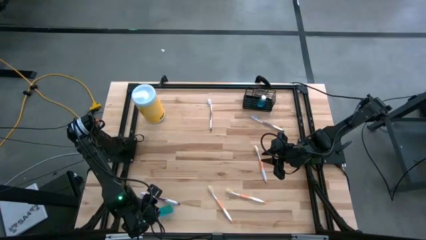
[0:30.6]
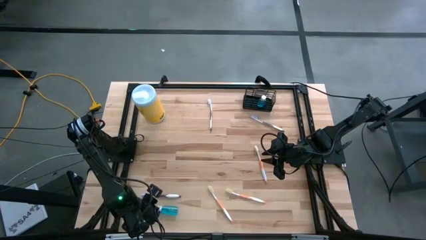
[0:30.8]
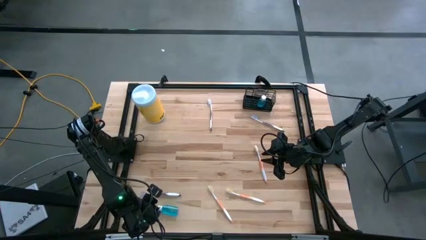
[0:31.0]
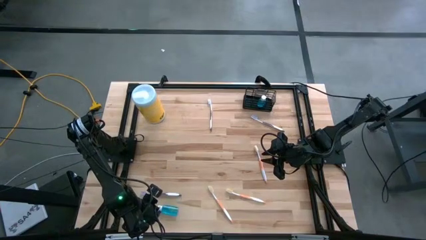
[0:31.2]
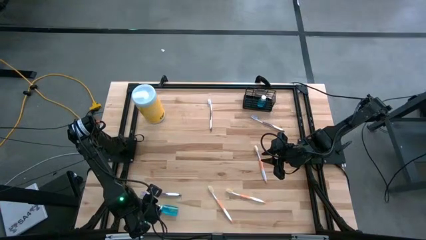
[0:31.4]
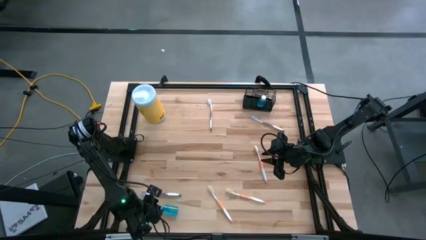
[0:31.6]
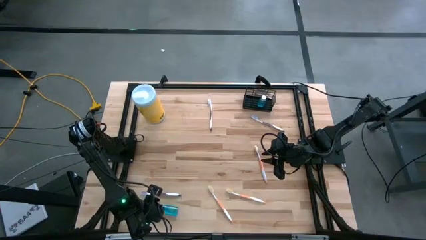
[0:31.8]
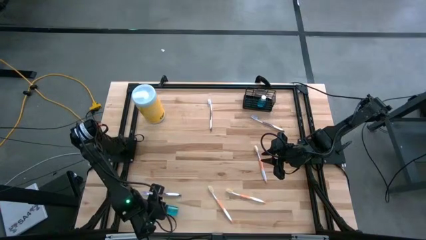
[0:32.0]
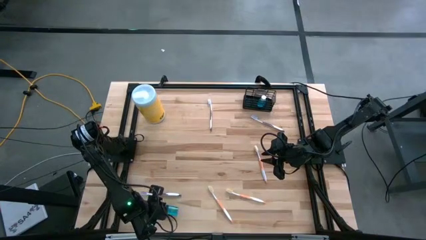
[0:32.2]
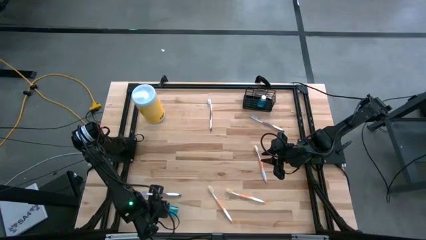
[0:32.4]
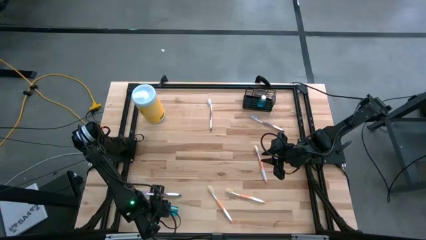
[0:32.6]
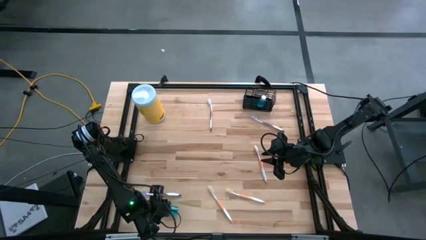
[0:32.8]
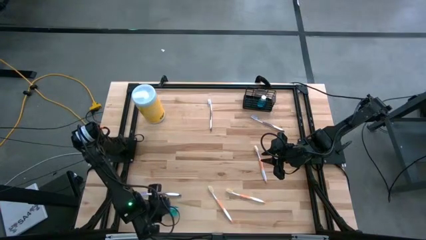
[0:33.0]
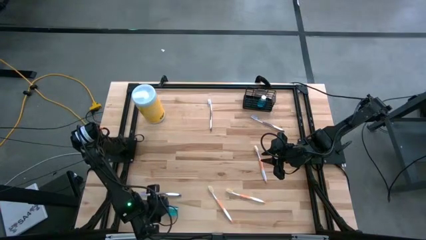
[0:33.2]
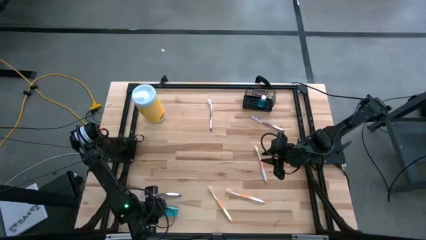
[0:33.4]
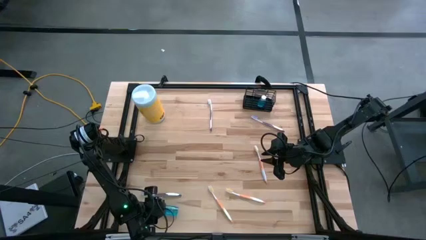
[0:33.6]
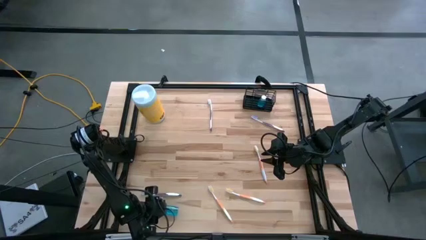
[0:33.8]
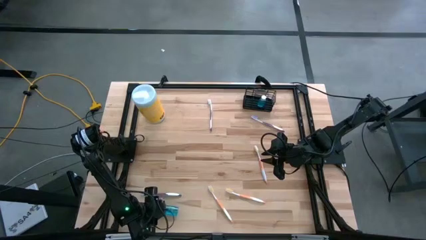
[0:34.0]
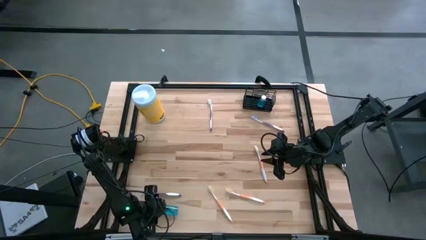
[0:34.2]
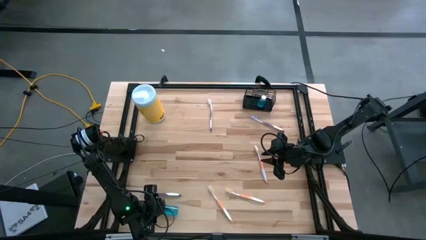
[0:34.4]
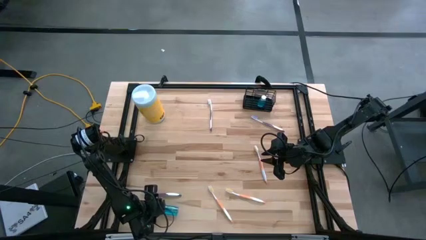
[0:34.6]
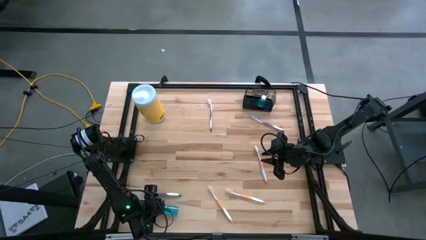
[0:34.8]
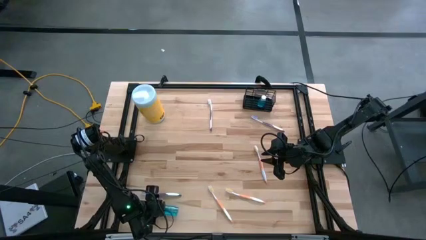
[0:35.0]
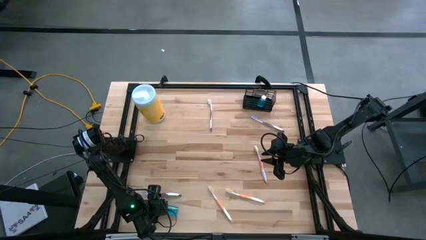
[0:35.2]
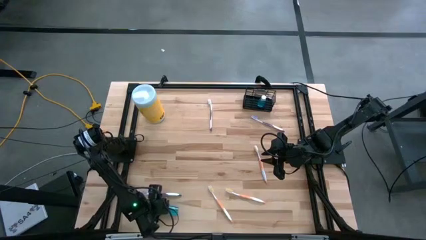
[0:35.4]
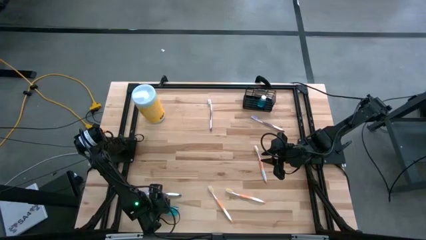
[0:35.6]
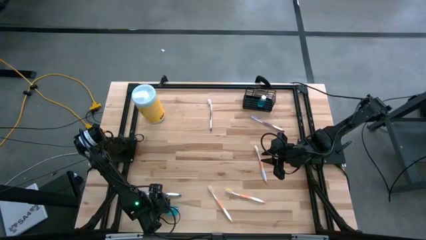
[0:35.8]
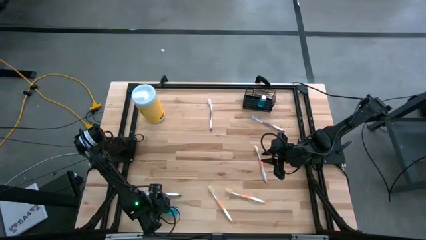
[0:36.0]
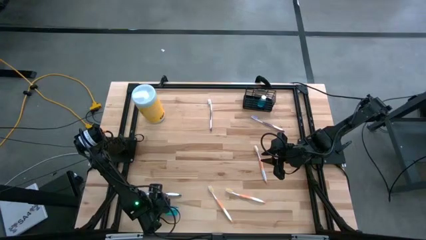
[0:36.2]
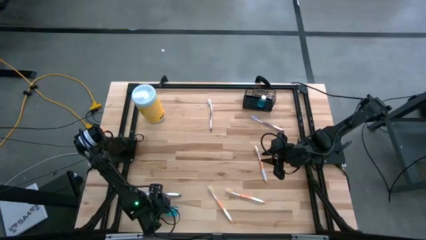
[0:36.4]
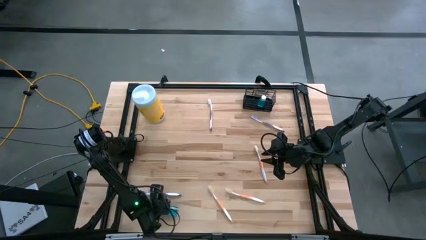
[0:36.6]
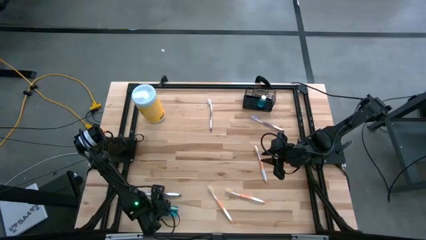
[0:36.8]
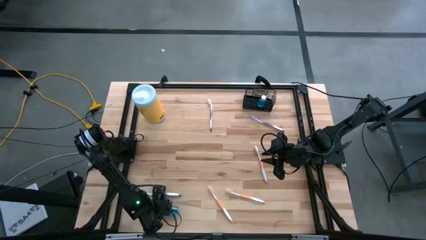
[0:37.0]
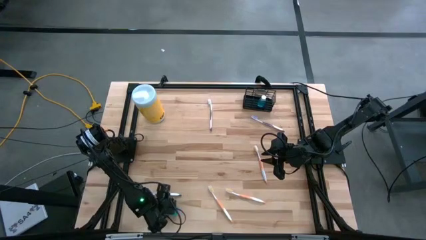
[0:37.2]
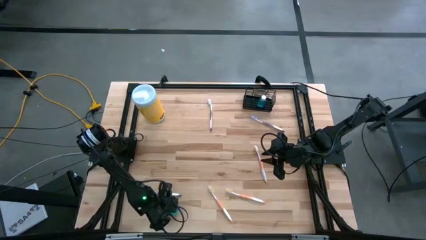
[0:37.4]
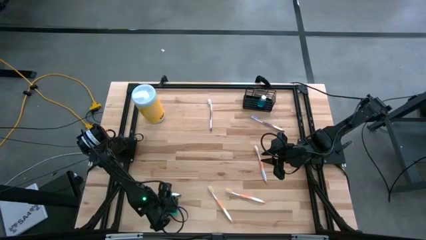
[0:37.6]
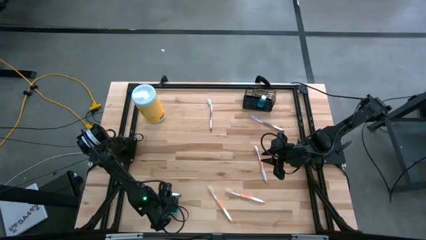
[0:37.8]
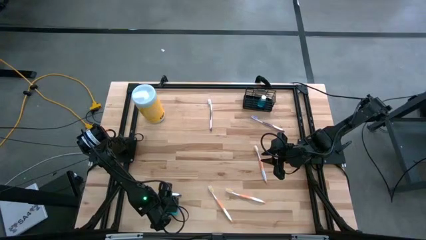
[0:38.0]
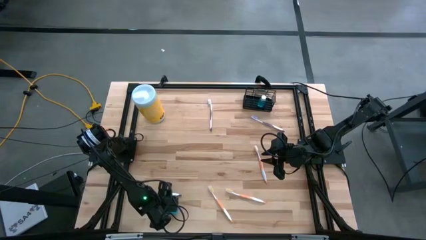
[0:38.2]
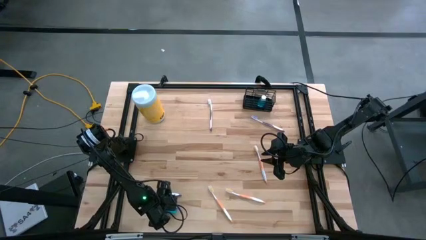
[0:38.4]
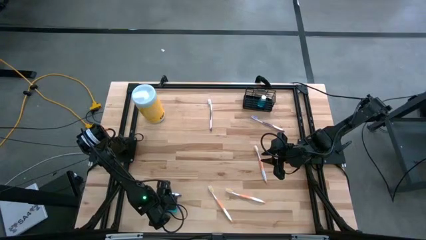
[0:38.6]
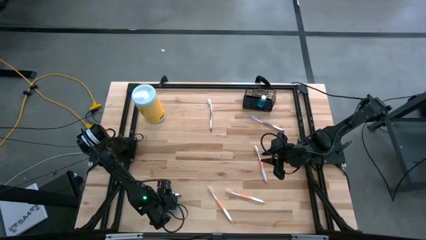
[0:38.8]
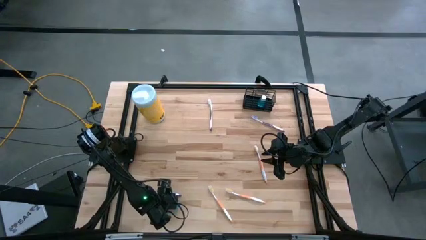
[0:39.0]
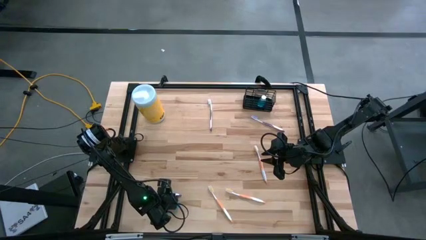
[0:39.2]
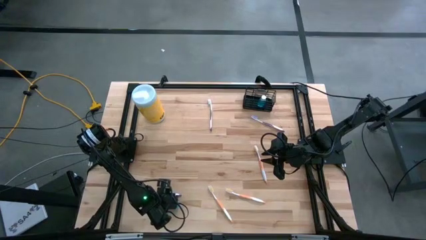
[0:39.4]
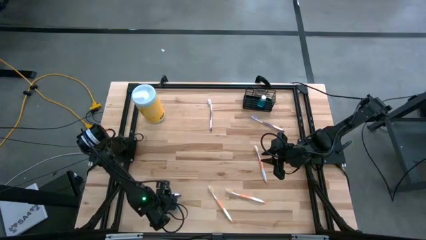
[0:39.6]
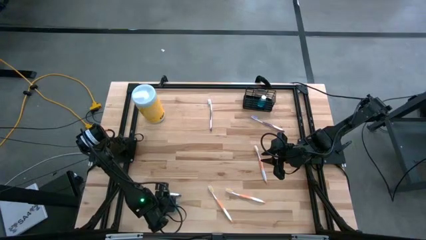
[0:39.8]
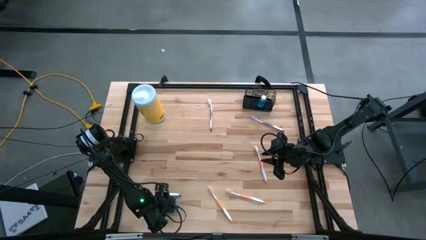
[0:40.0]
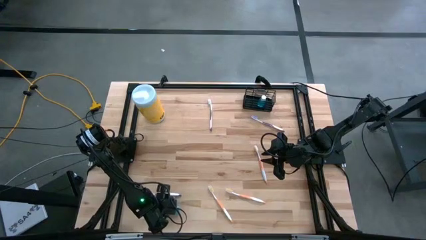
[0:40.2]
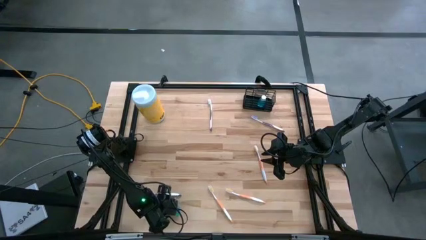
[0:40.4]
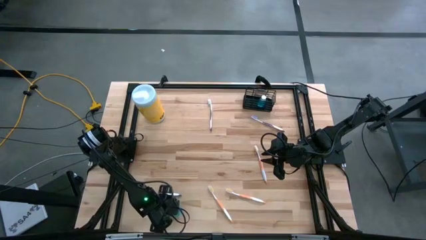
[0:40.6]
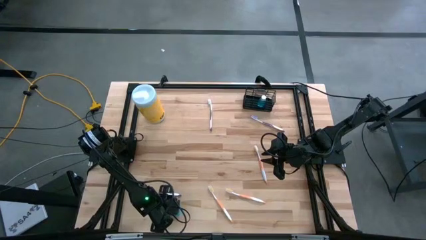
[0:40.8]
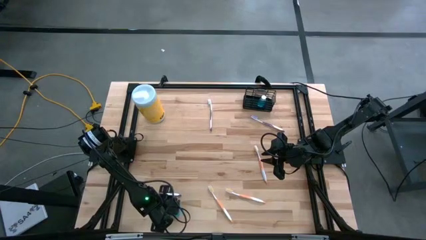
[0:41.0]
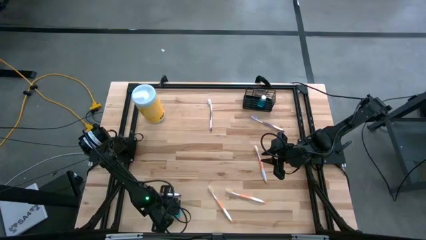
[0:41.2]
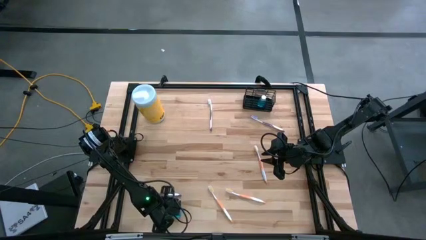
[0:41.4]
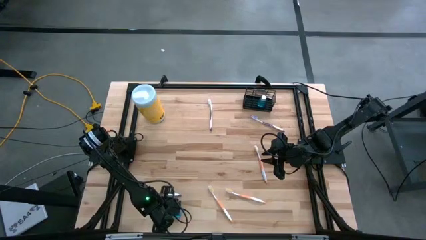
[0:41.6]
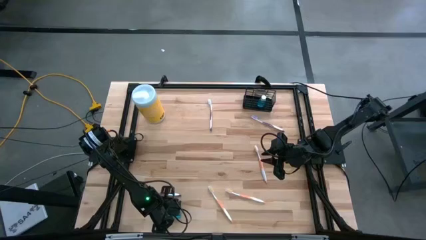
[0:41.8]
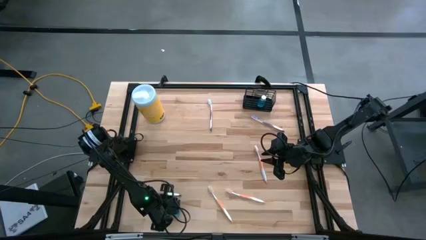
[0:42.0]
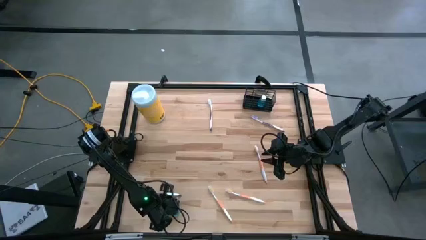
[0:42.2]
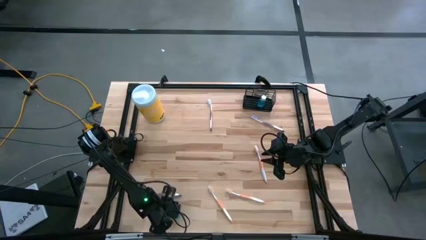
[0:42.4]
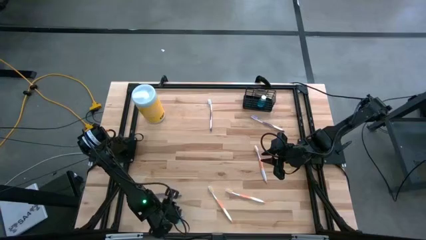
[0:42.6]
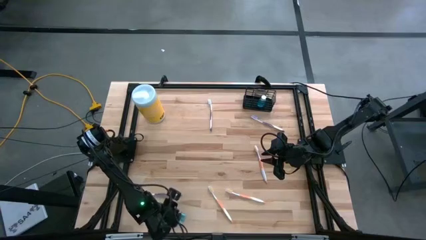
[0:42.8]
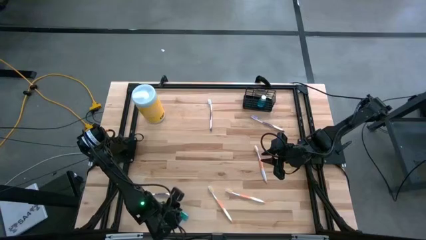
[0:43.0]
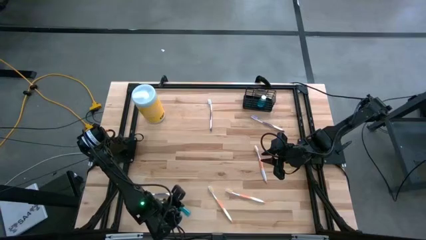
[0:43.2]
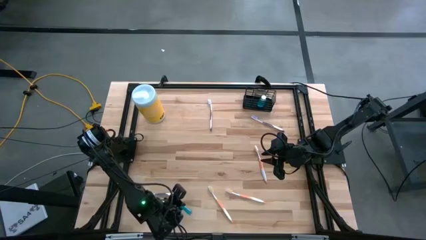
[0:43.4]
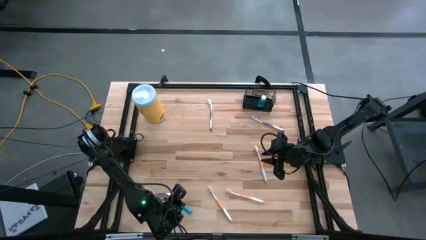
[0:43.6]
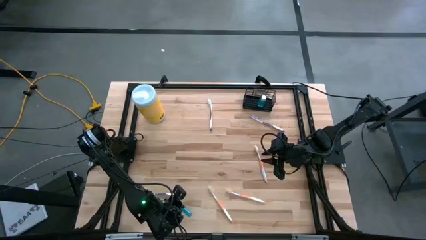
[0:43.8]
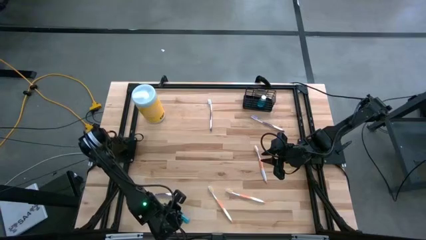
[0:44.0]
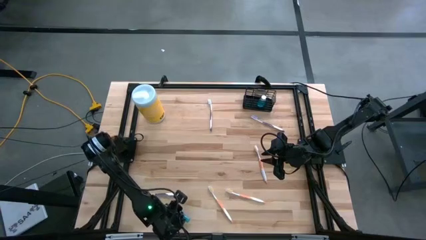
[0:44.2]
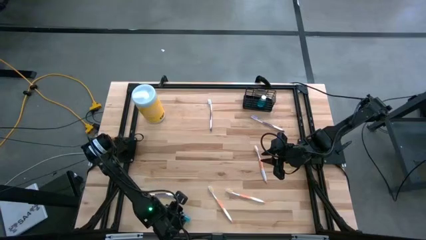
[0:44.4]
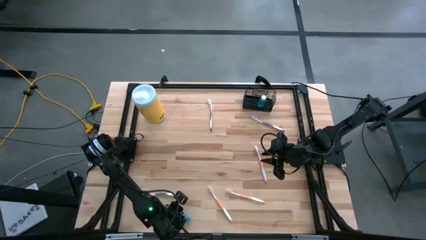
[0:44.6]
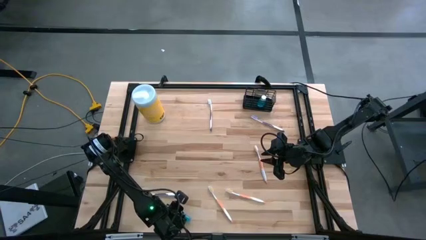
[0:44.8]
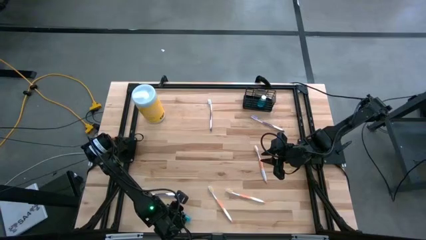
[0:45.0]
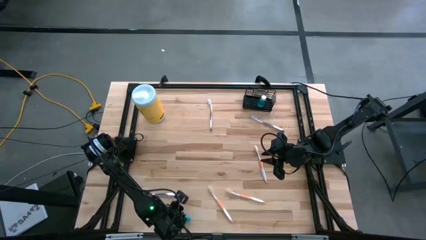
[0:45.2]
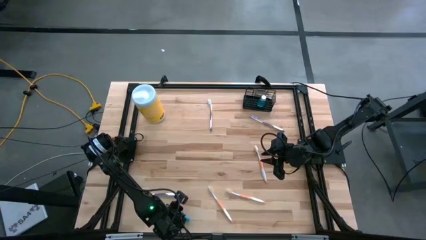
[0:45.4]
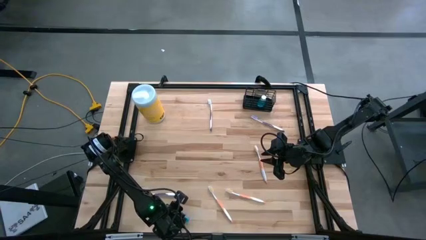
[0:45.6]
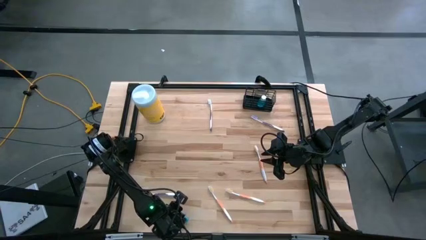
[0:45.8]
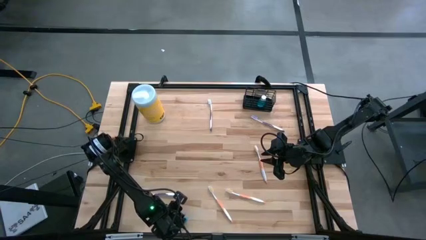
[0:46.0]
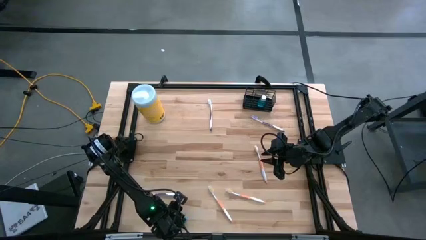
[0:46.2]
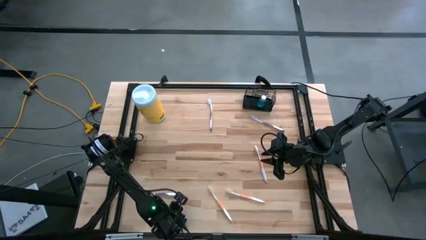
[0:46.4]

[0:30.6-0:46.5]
Task: Pick & Place toothbrushing station
Put the blue mouthwash into the black wire organizer
